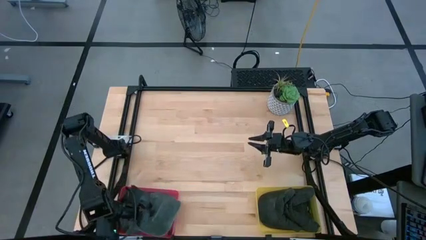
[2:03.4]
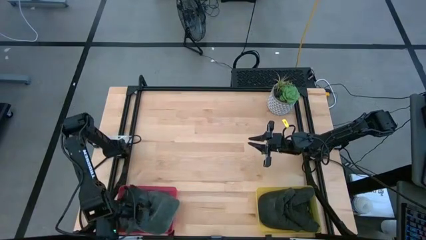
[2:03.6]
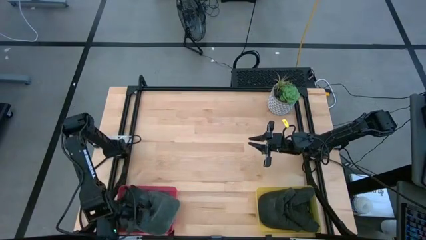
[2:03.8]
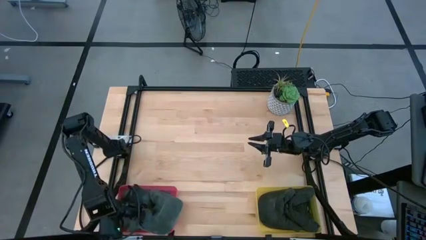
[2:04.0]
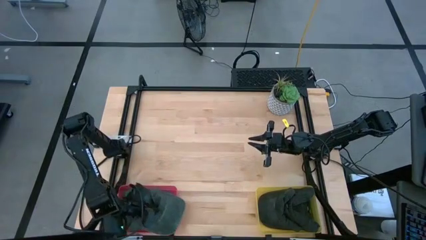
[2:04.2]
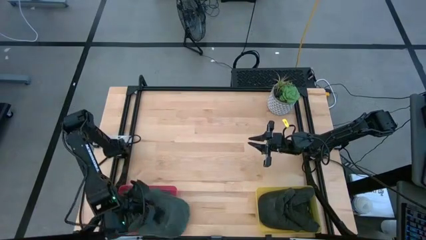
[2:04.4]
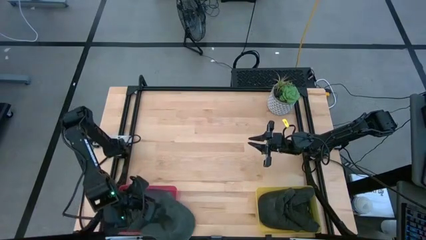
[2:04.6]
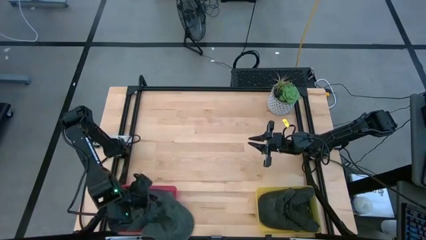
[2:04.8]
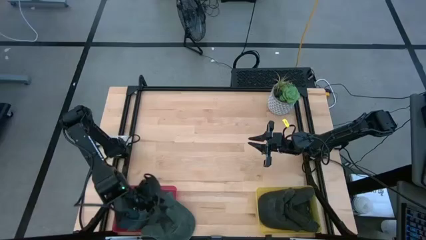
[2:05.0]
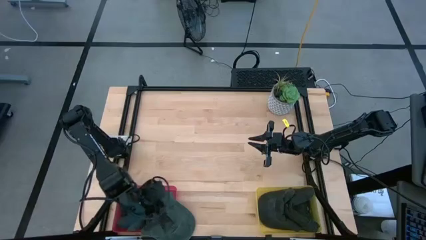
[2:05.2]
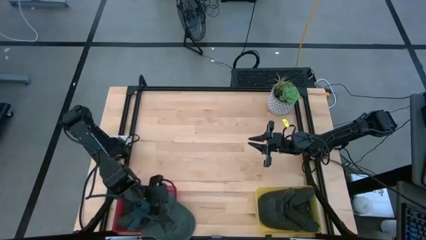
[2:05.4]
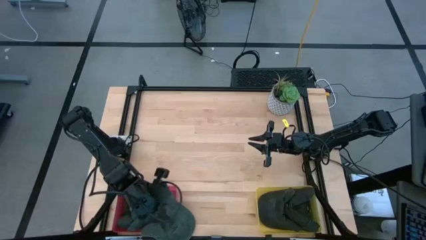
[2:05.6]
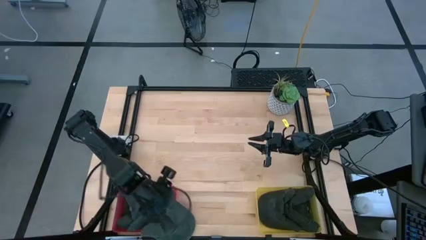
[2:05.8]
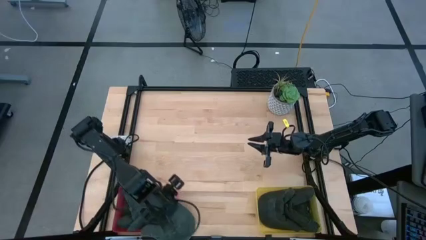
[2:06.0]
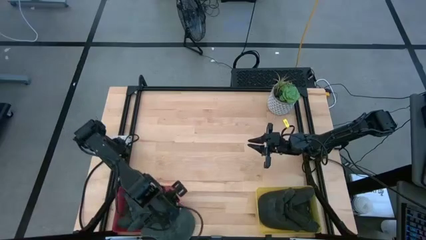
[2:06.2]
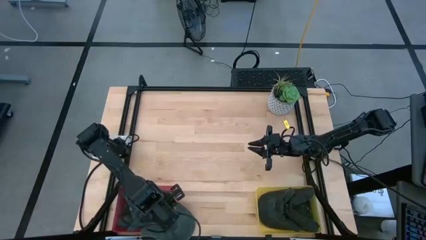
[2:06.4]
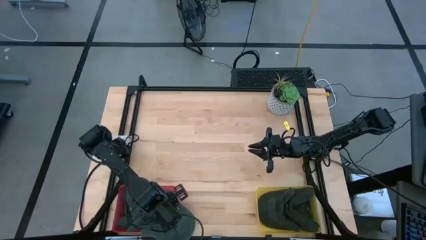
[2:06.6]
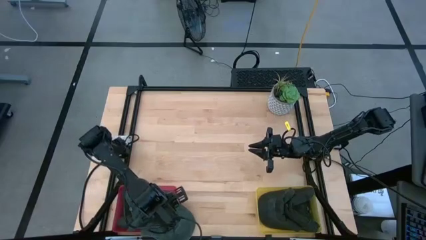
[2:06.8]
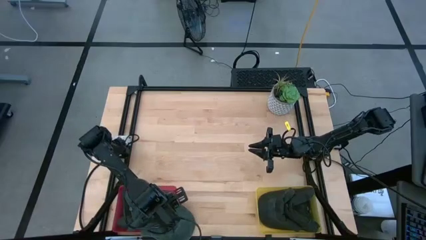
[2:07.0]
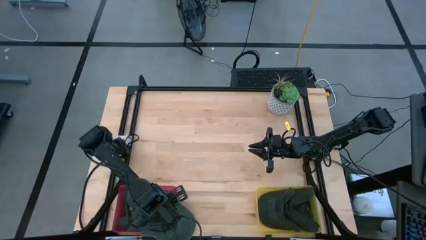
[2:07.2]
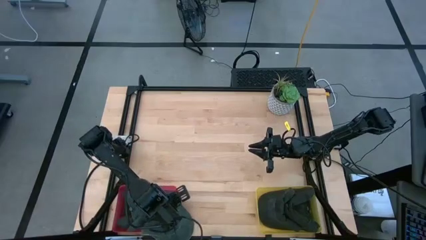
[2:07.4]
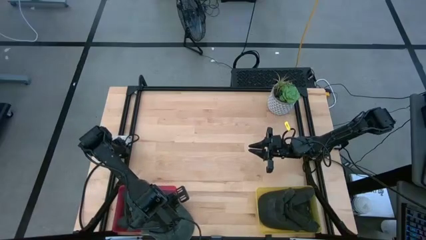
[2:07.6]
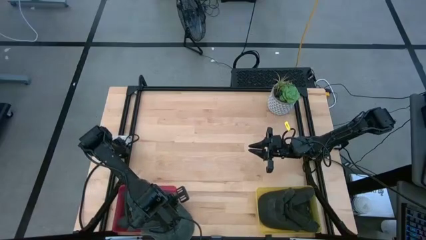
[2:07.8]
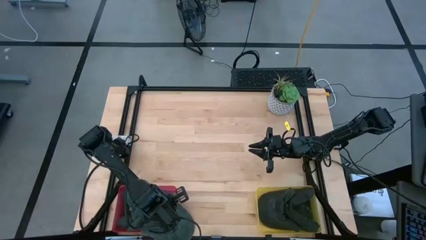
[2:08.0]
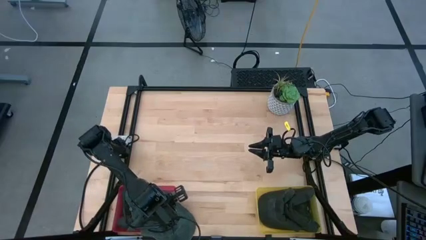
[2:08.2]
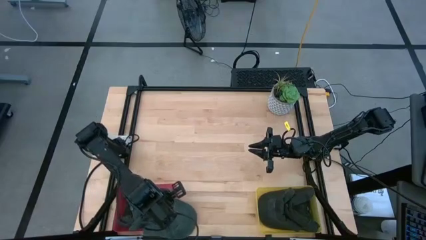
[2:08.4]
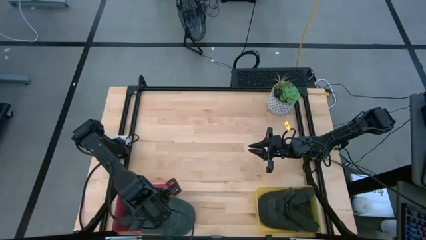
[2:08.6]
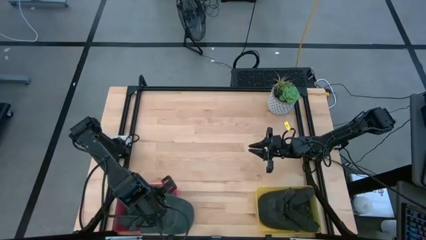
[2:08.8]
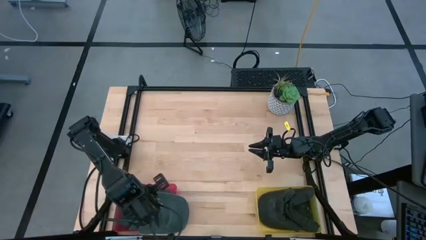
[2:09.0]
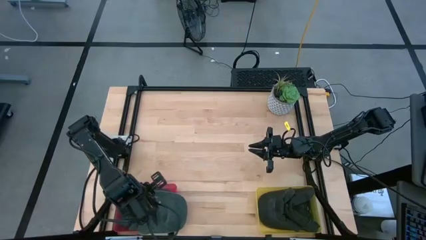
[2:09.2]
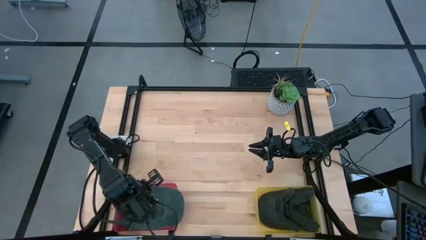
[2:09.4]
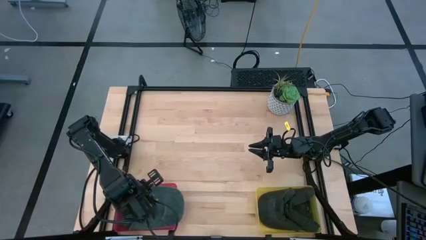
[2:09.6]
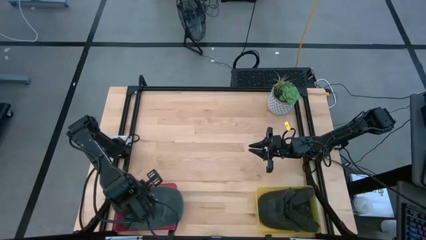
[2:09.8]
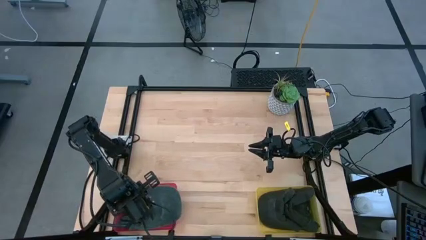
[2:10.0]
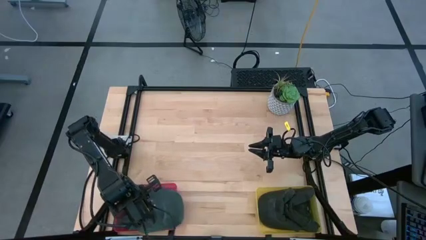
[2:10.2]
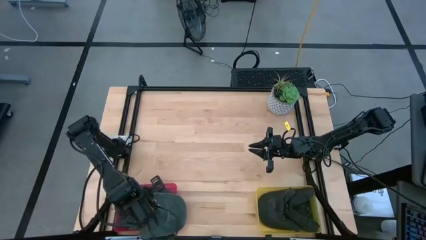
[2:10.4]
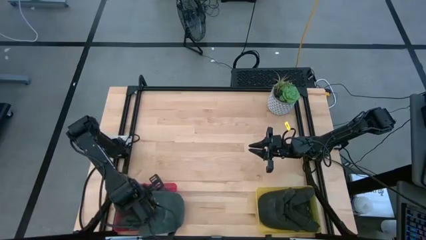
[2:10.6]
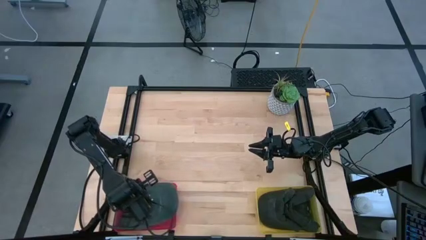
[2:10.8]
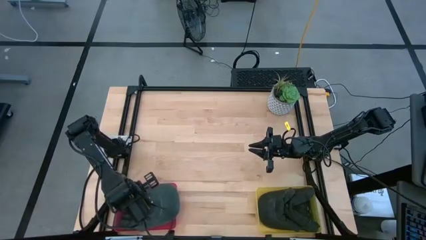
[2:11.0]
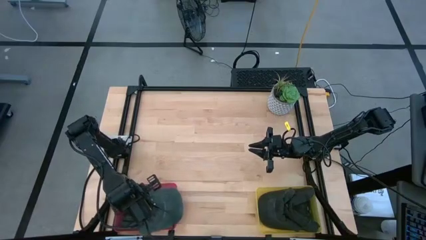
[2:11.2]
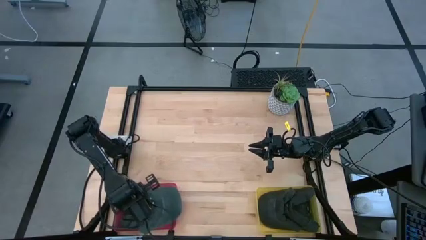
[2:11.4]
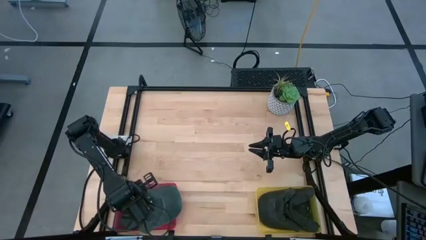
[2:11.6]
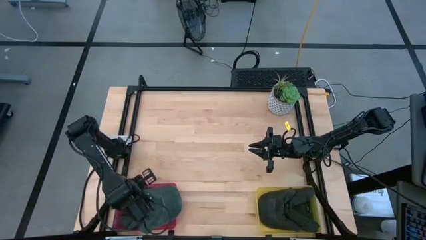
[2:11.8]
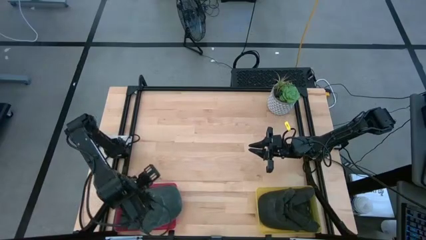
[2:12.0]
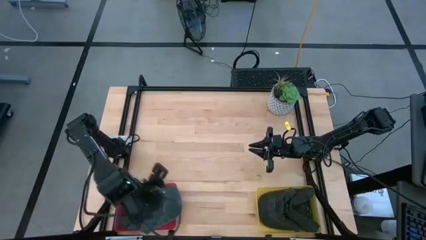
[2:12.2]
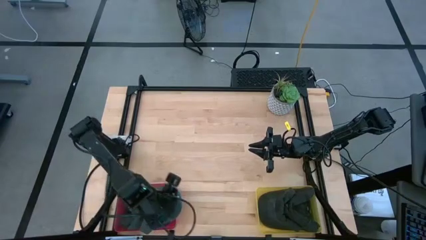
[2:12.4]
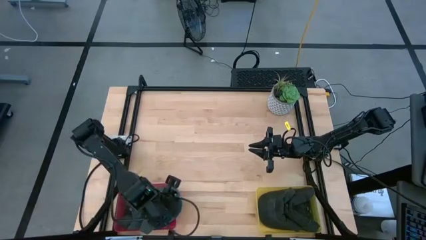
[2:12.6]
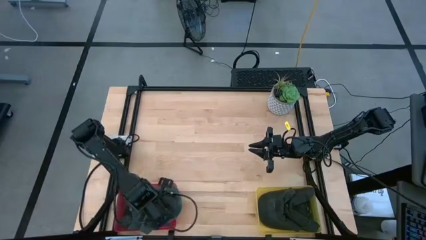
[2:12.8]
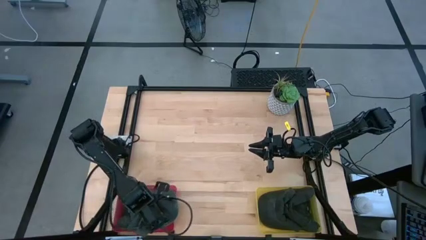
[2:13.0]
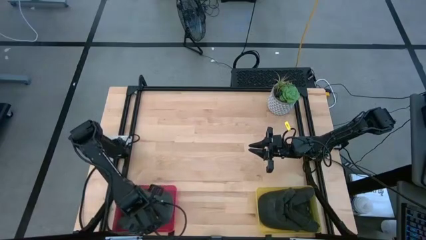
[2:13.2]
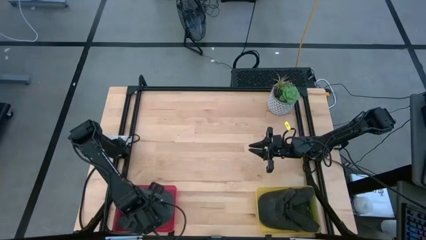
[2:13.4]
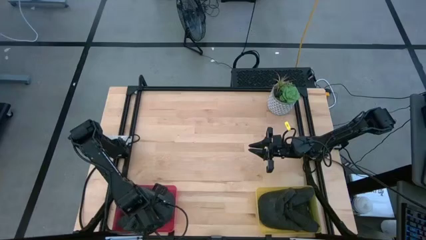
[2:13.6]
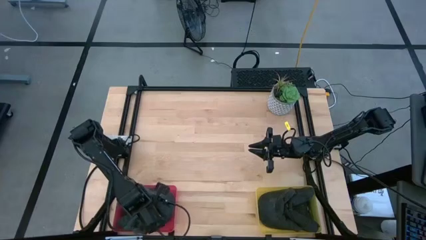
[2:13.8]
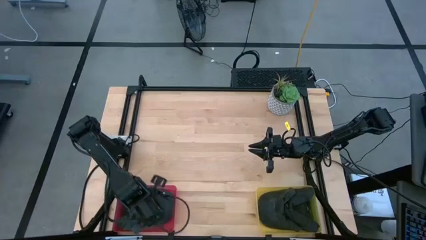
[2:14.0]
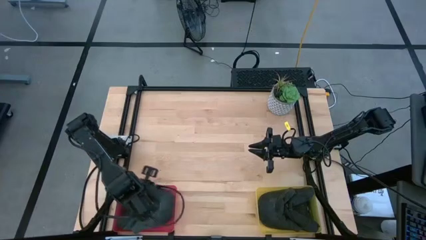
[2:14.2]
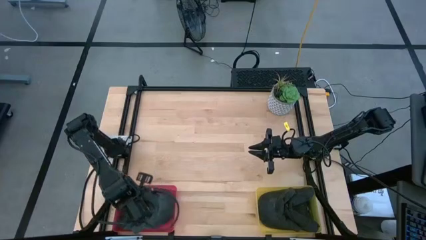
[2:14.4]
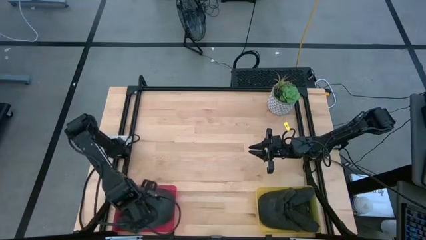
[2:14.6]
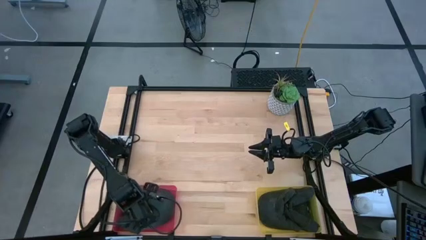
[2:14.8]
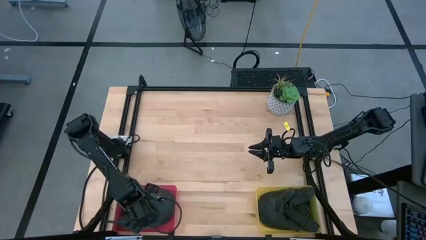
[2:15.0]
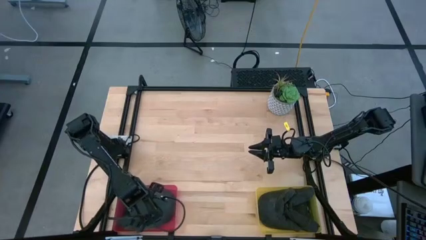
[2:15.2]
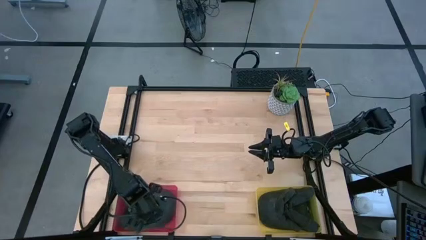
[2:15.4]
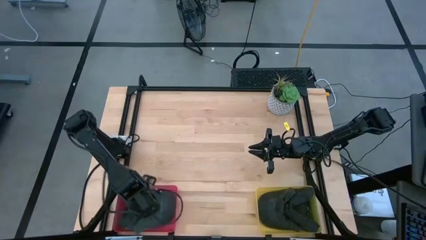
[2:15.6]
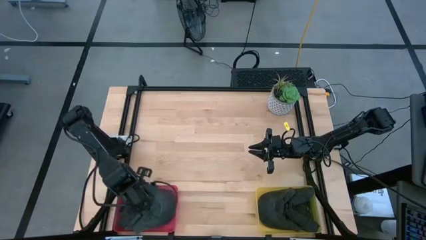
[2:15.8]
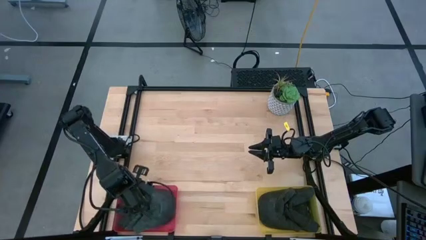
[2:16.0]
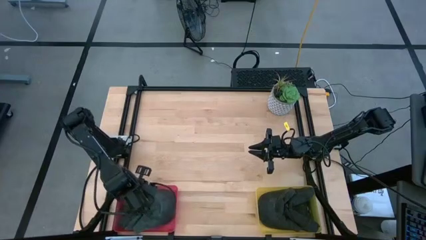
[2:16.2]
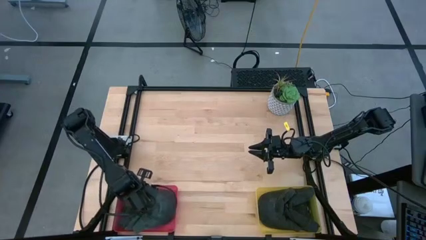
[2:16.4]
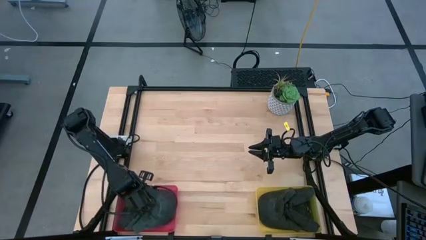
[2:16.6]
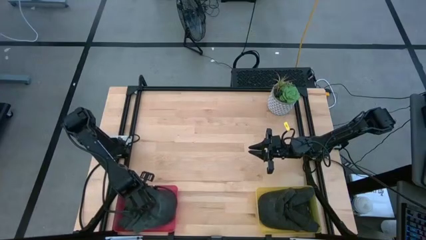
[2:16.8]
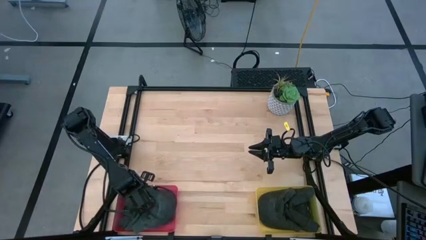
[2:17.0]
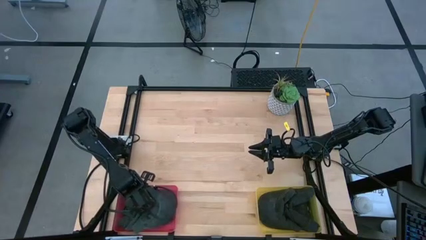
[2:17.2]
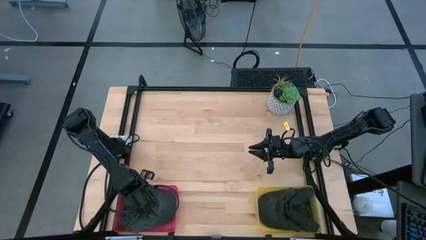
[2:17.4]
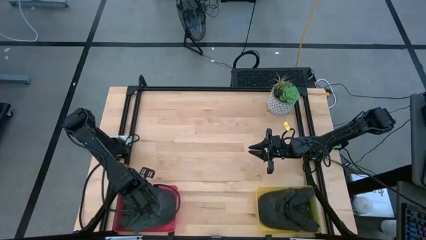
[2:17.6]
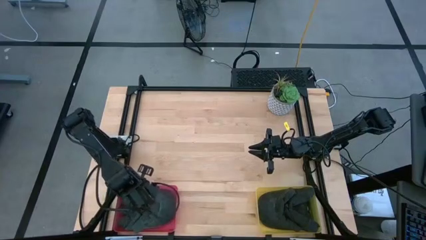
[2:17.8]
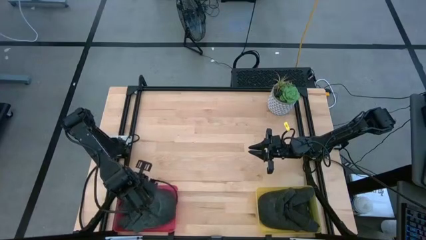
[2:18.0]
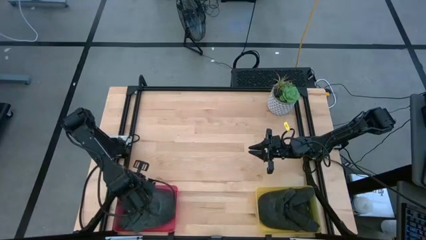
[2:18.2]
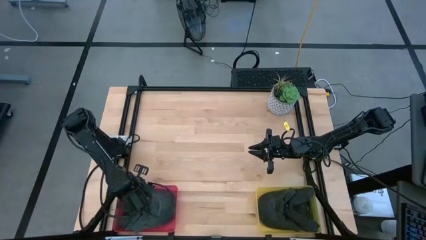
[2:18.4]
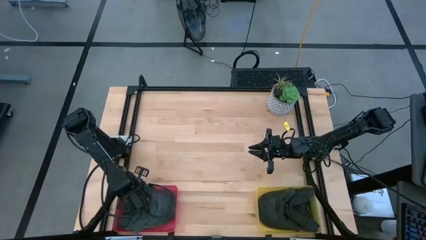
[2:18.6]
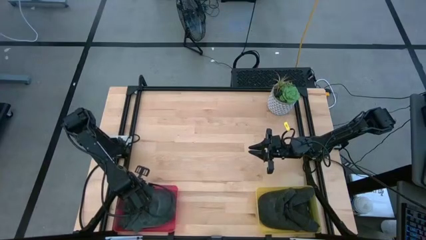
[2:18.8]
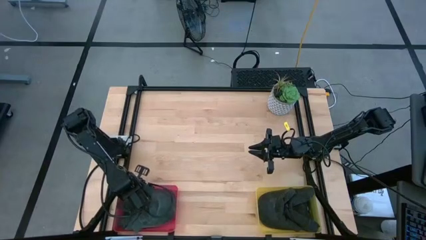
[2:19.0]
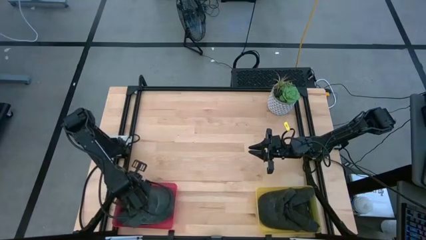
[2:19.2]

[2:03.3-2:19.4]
Task: Pick & Place hat
Put the grey cap into the pink bin

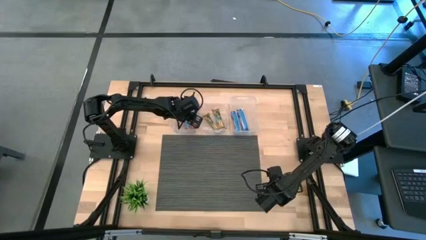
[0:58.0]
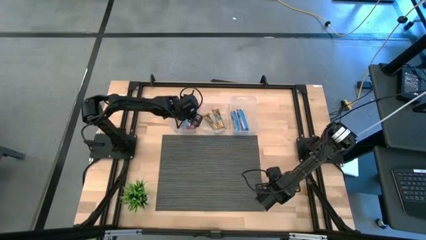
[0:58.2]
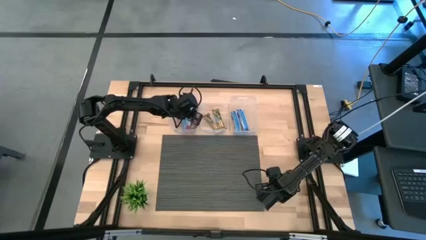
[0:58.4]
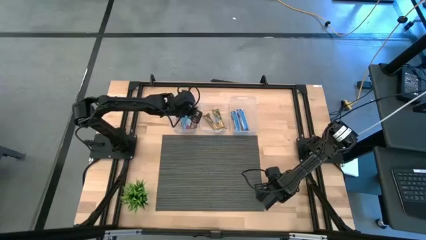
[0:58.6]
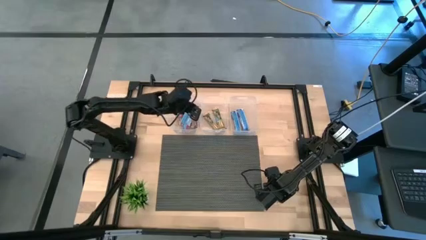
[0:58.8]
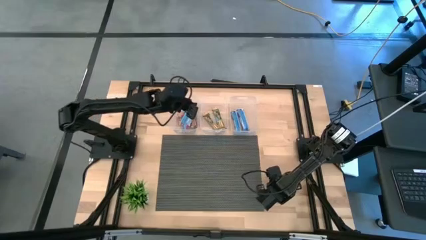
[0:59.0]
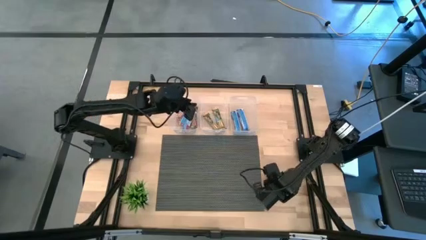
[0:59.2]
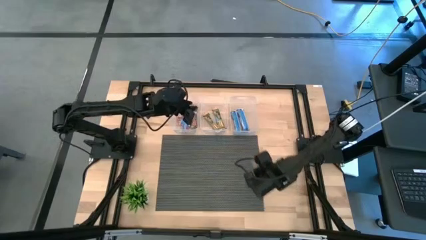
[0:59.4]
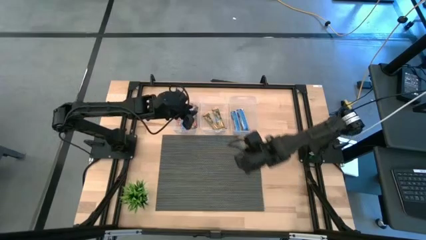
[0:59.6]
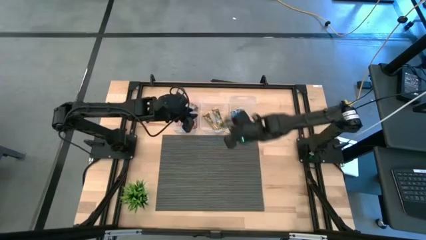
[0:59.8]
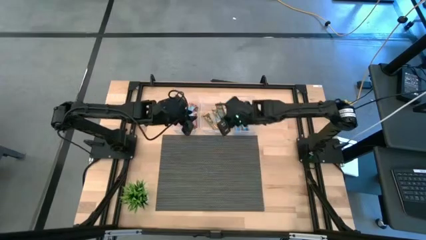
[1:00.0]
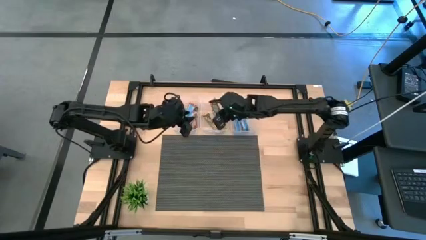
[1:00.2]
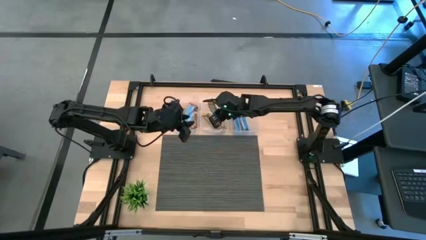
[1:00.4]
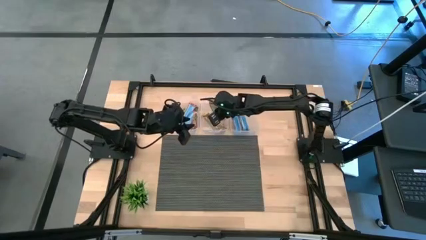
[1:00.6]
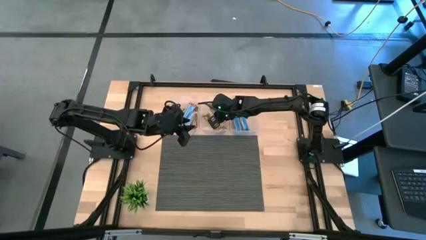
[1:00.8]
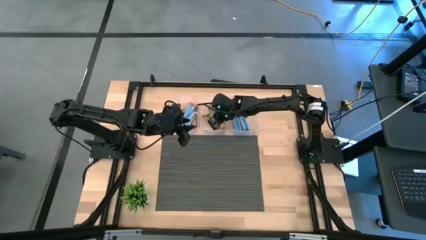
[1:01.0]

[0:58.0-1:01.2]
Task: Pick and place Granola Bars by type
Put the orange granola bar into the middle transparent bin
